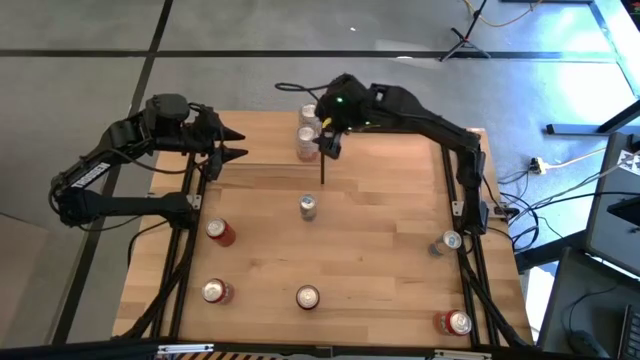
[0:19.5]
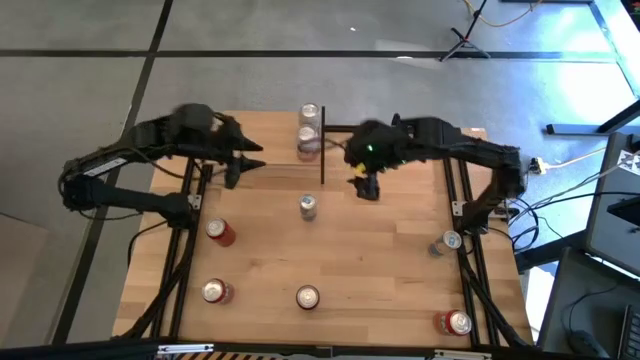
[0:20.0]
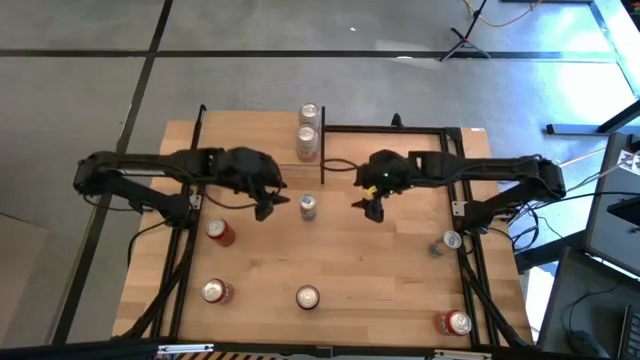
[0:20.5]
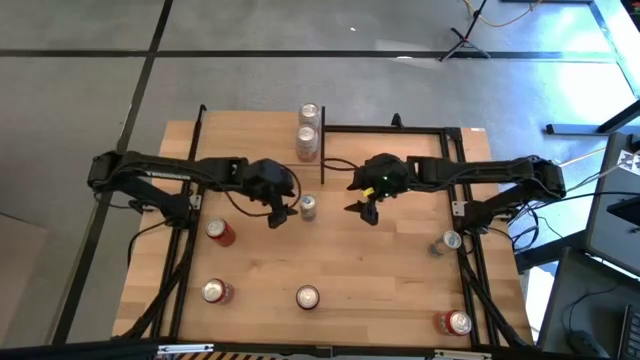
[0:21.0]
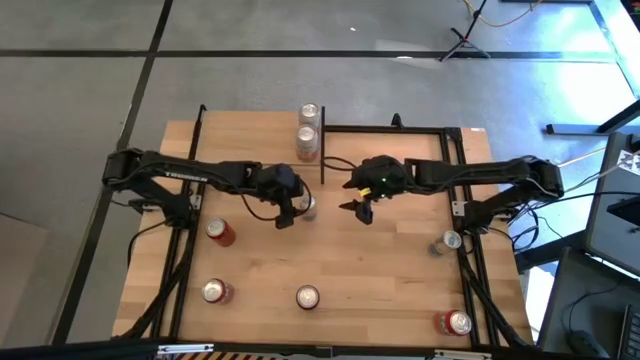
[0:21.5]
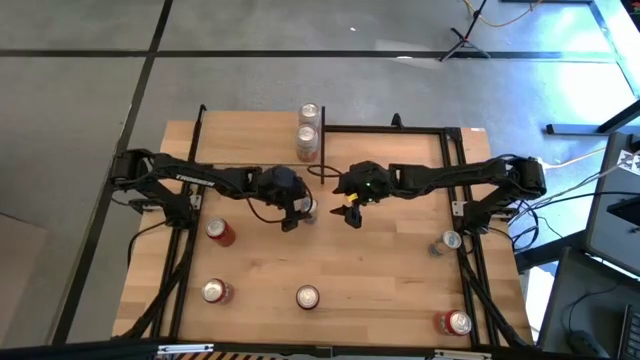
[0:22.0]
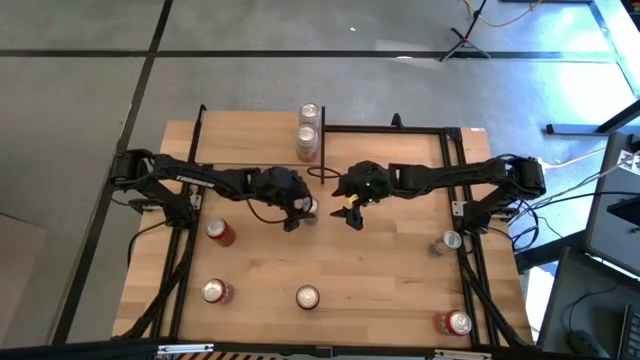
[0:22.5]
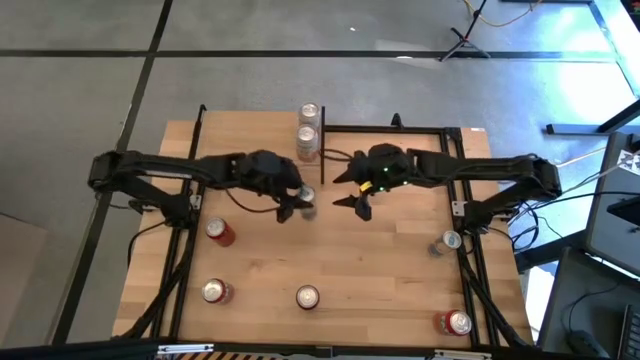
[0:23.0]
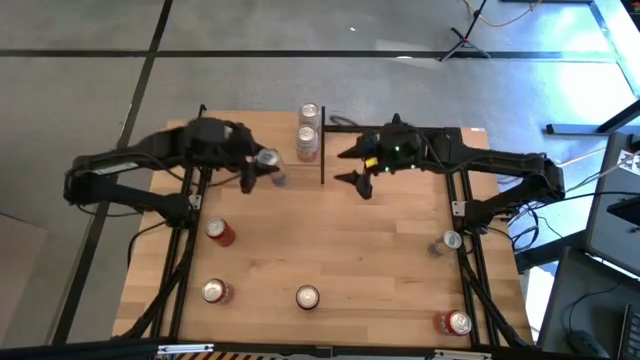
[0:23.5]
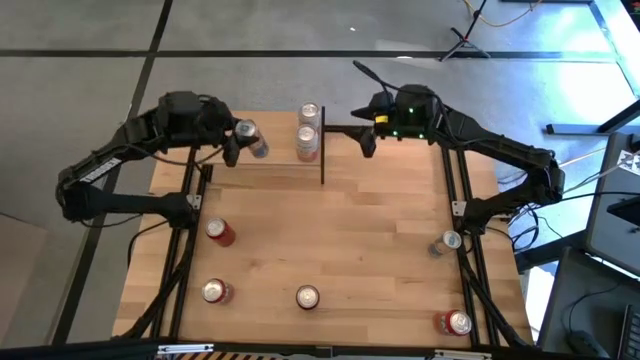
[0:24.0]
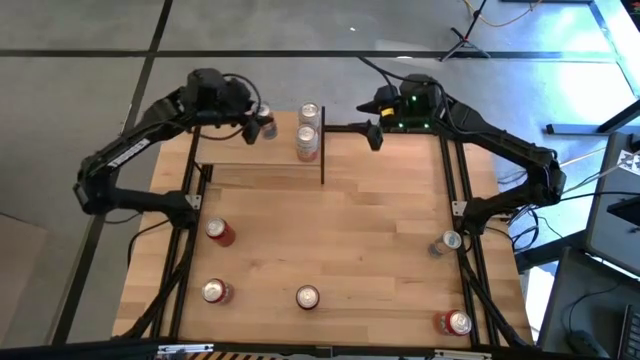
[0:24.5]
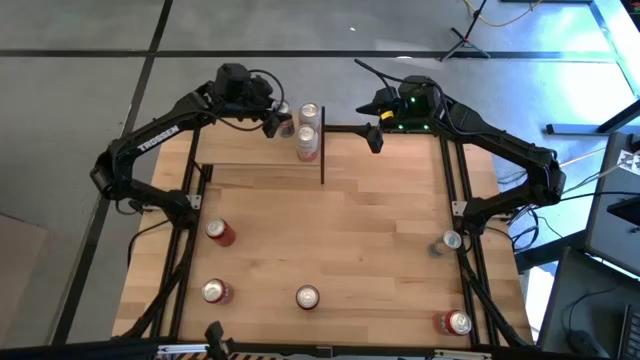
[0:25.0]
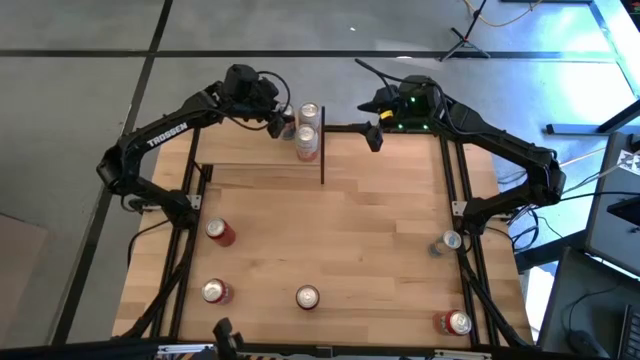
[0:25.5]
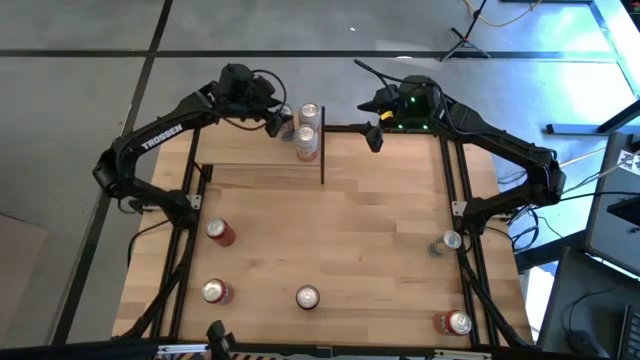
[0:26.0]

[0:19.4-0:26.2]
Task: Place canned beverage on shelf
Put the left blue soda can on the shelf

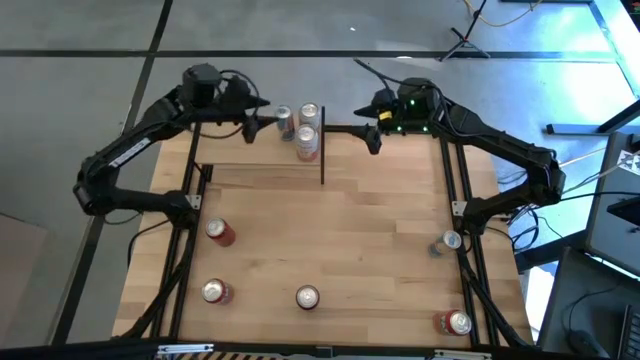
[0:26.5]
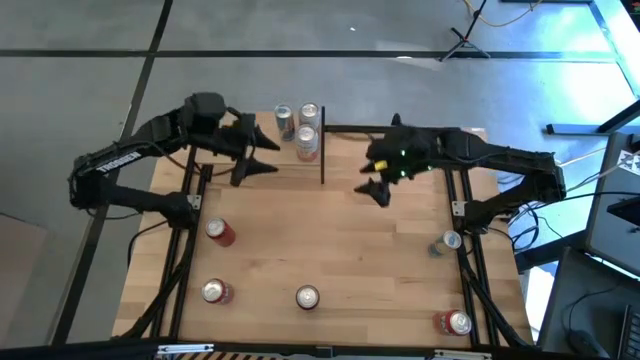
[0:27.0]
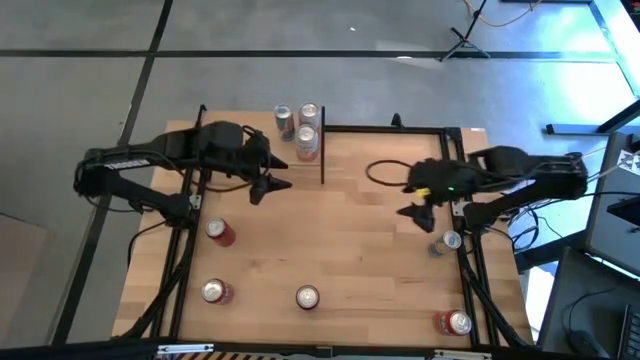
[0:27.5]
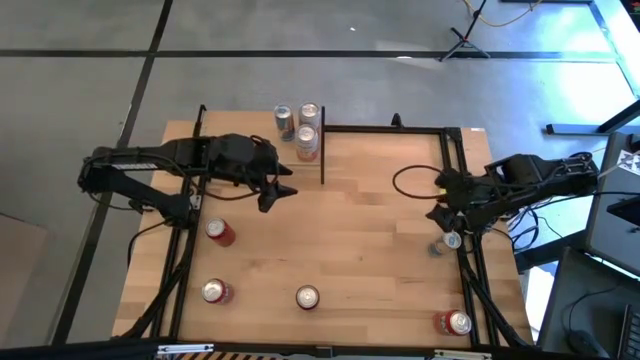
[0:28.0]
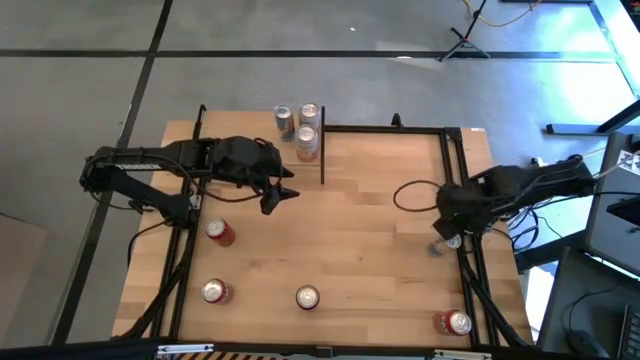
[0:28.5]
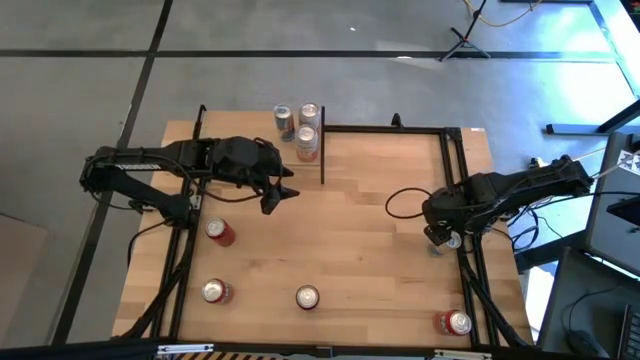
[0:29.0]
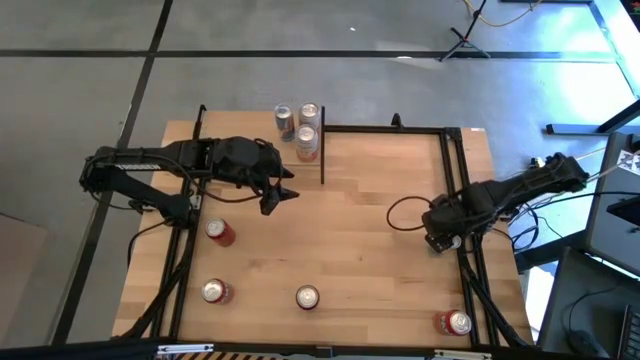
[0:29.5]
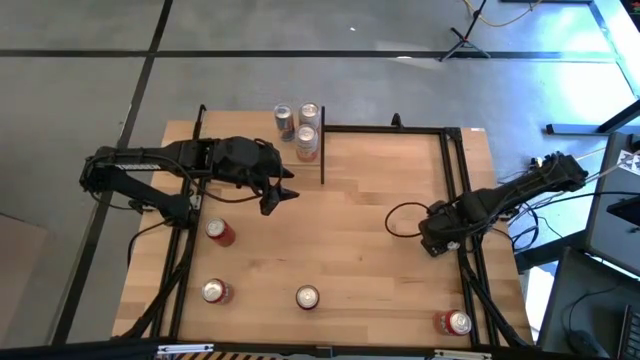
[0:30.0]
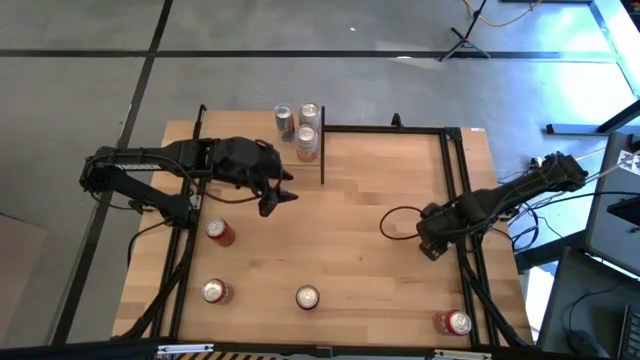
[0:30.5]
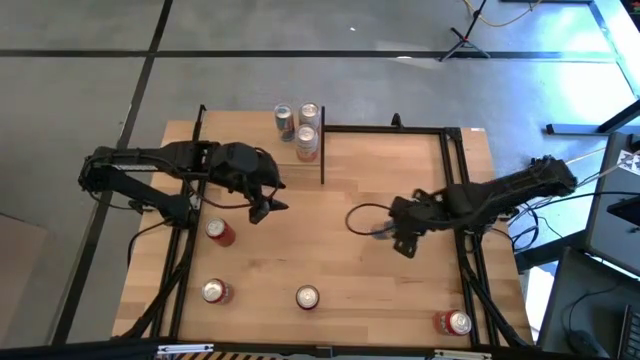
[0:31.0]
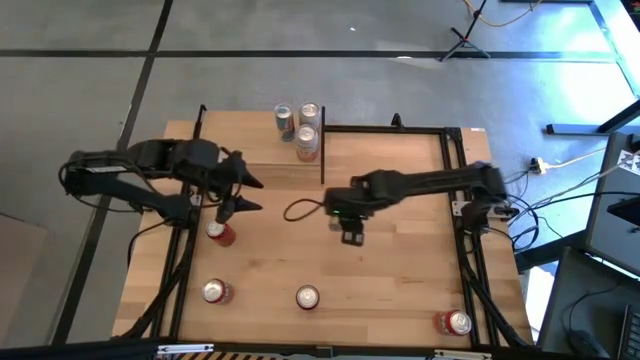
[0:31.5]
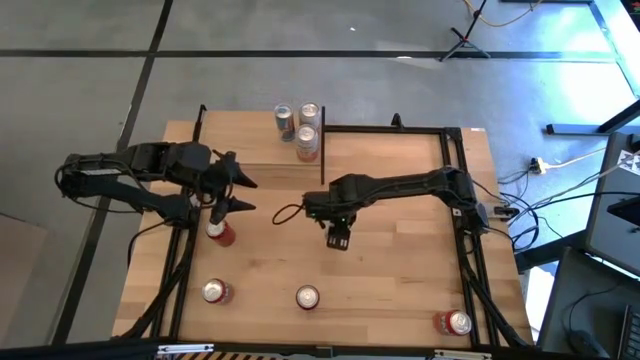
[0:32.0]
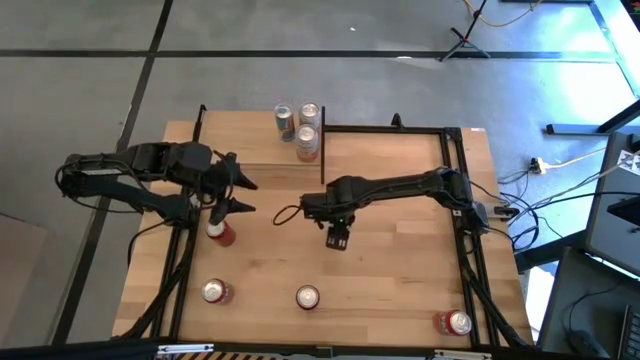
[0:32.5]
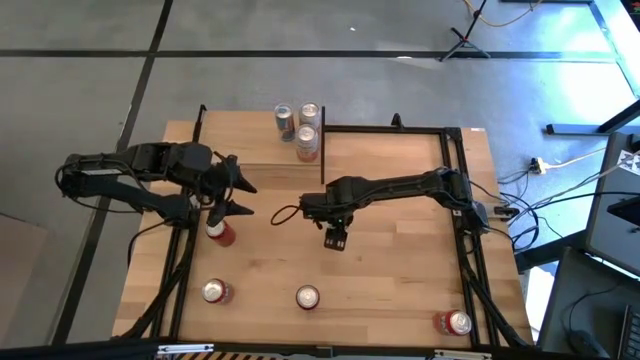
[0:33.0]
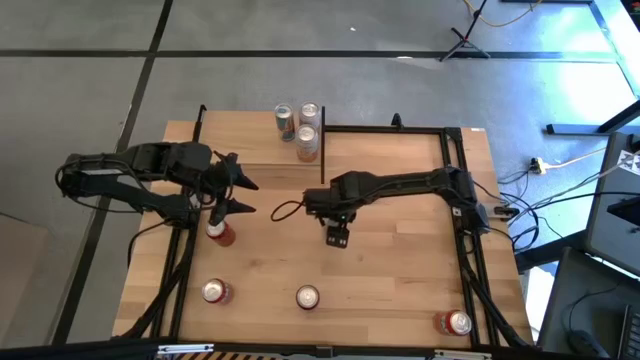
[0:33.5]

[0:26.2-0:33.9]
Move the blue soda can to the center of the table

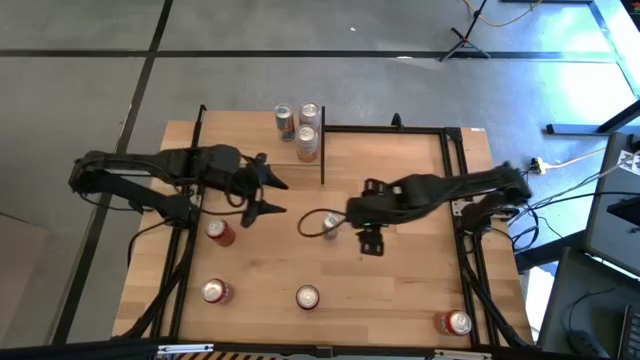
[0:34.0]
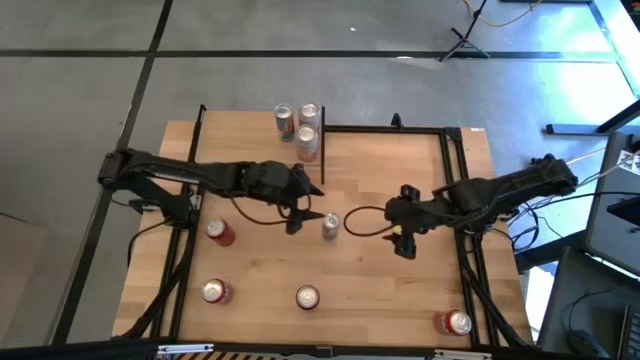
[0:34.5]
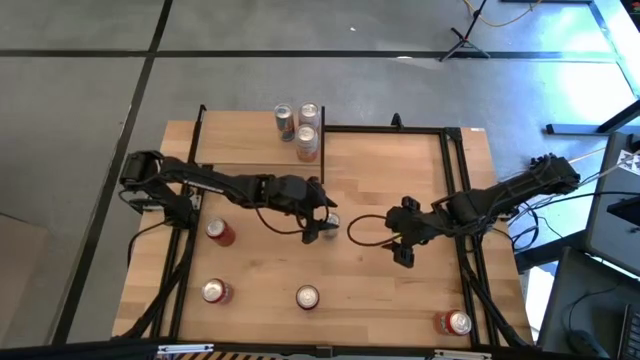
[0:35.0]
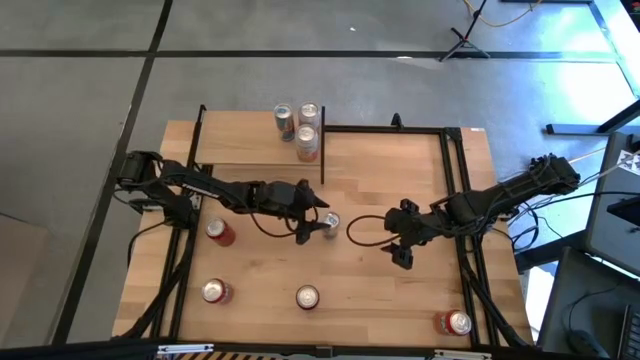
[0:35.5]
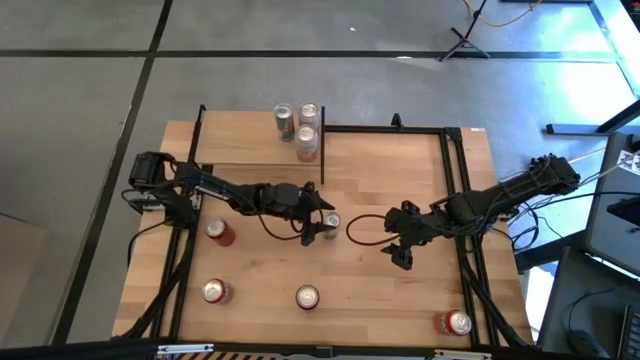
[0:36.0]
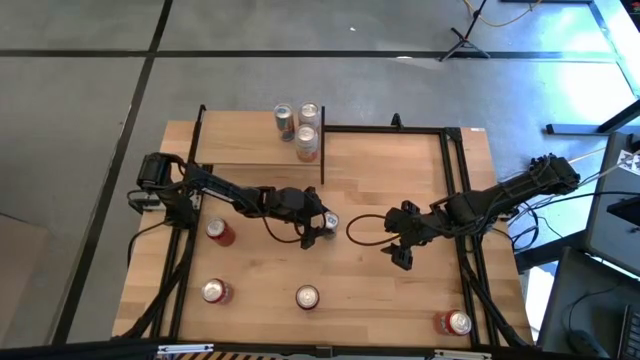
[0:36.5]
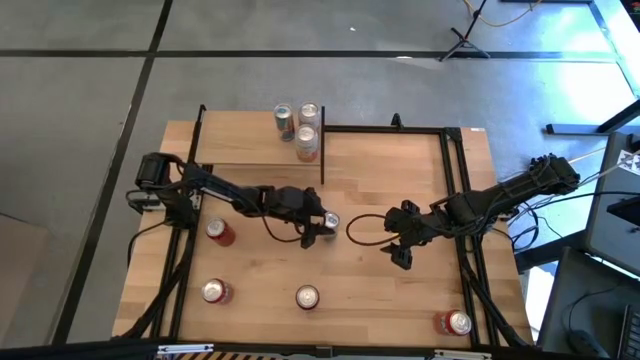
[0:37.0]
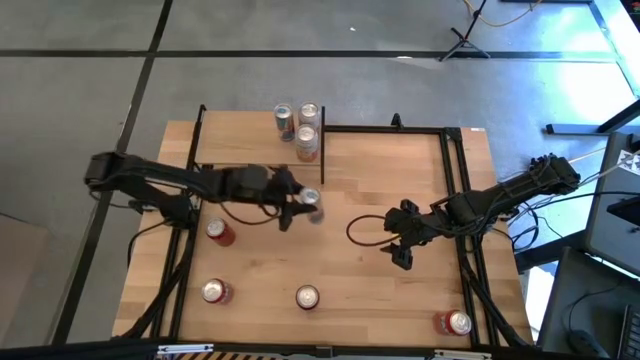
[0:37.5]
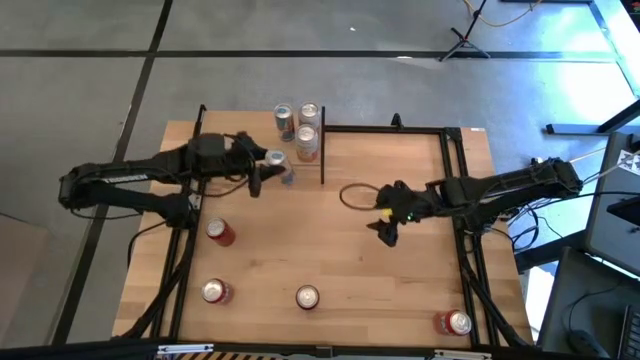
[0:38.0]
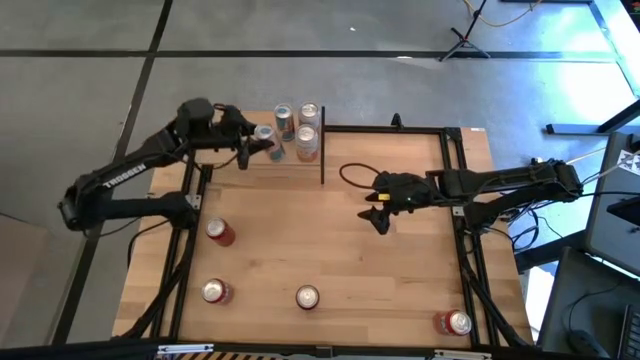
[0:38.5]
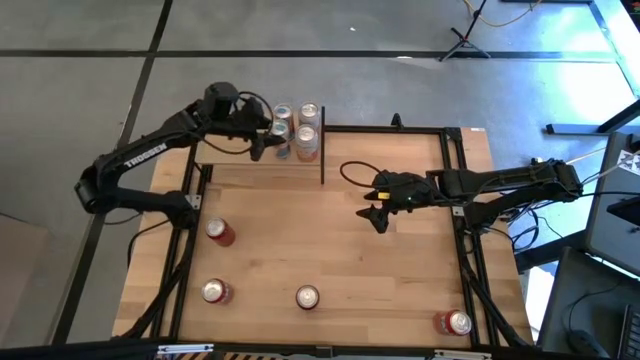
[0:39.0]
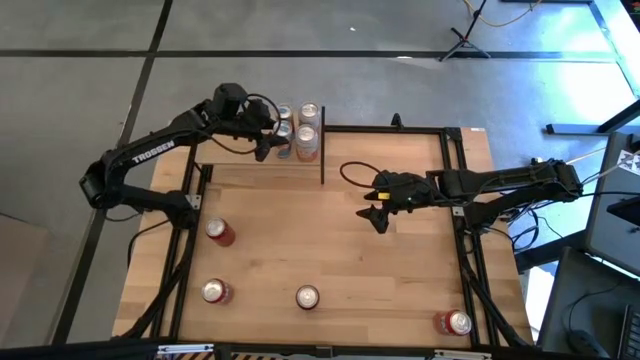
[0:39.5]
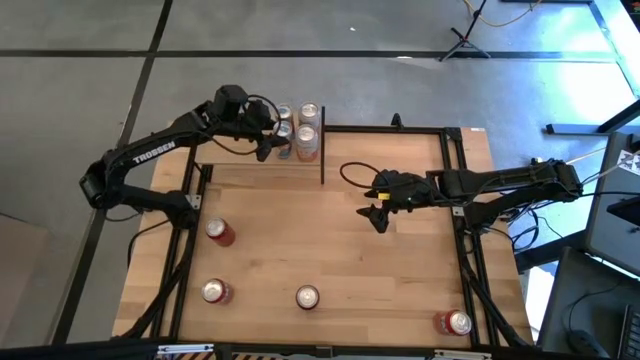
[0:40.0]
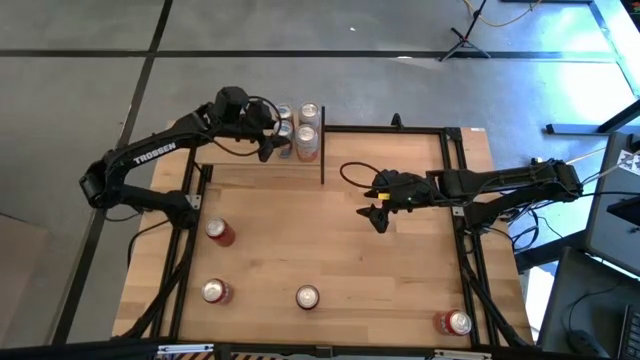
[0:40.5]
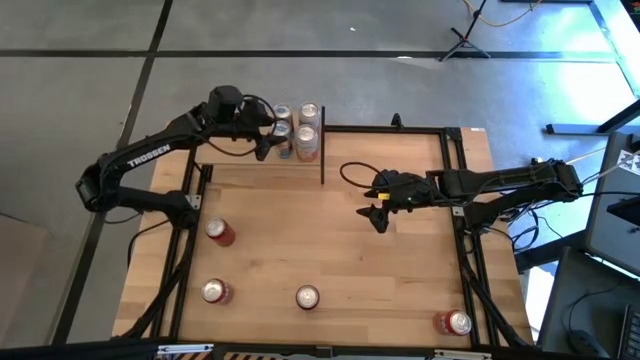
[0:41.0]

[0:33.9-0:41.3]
Put the blue soda can on the shelf aligned with the other blue soda can
